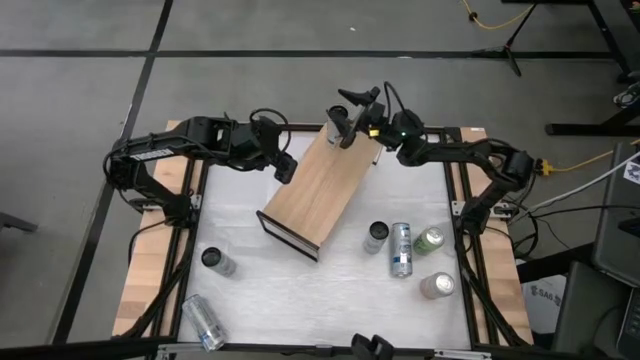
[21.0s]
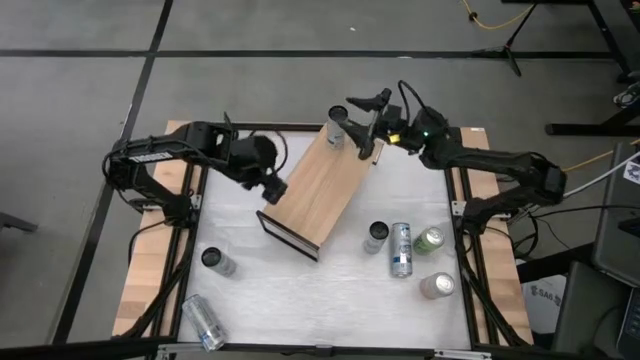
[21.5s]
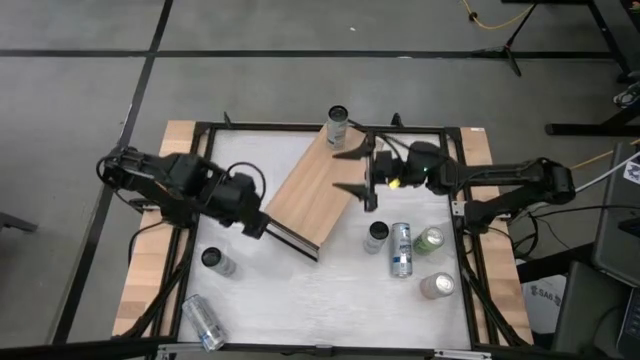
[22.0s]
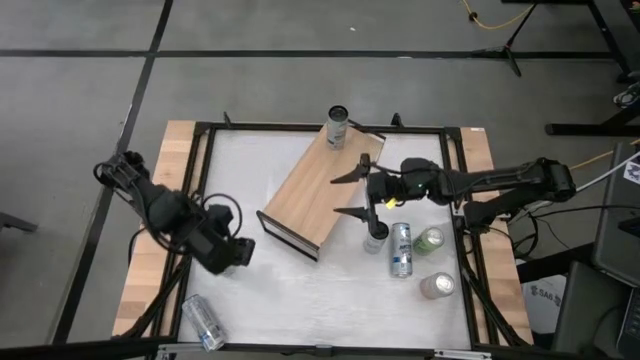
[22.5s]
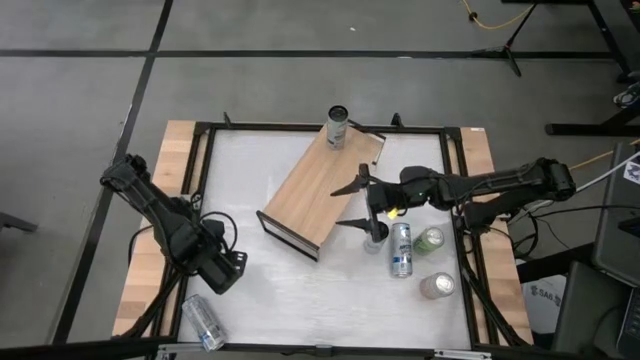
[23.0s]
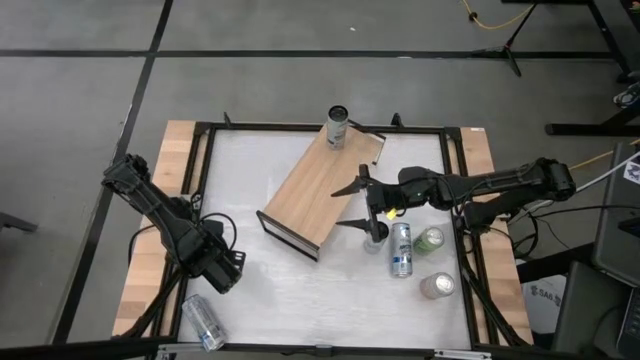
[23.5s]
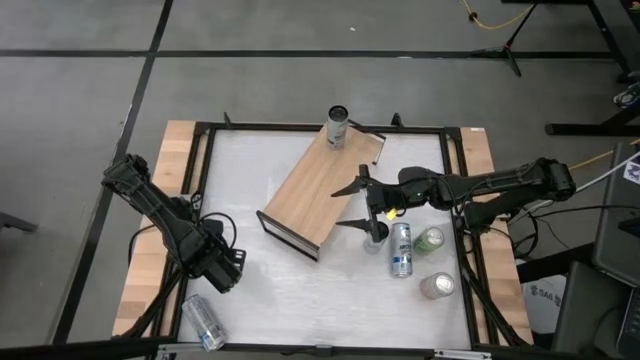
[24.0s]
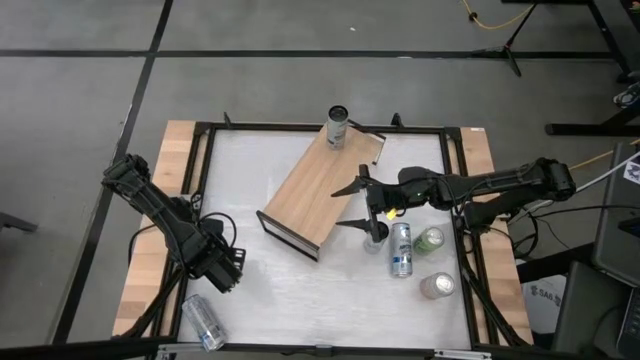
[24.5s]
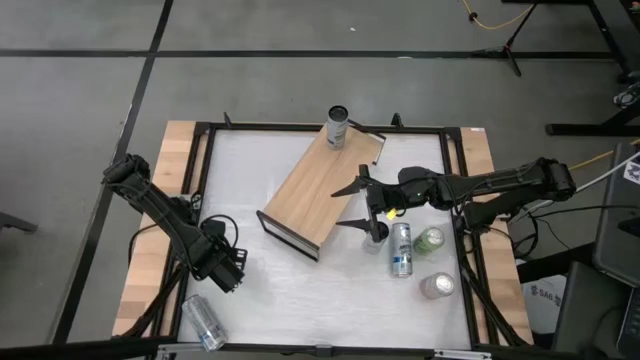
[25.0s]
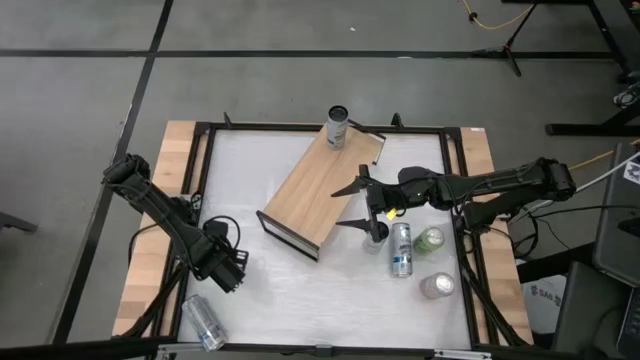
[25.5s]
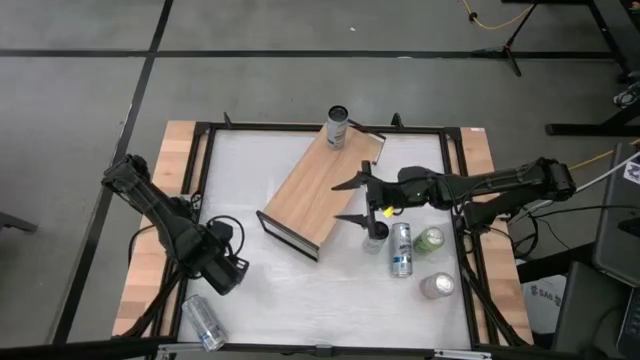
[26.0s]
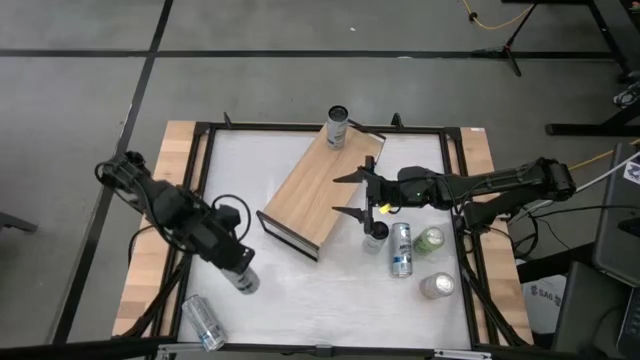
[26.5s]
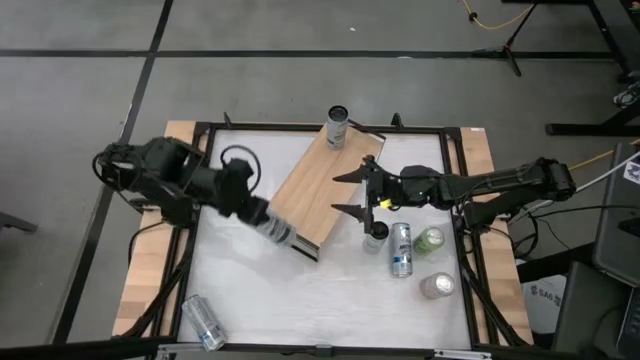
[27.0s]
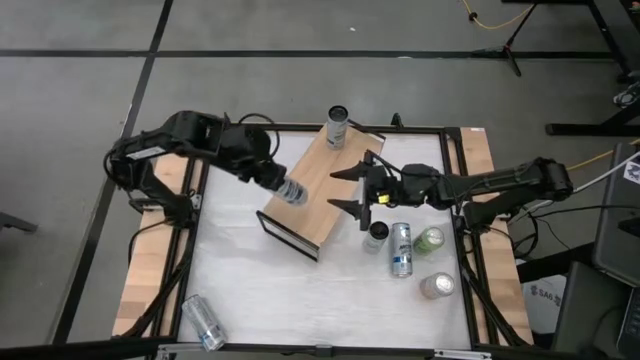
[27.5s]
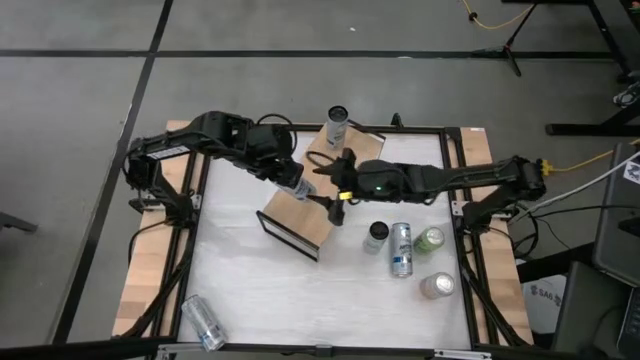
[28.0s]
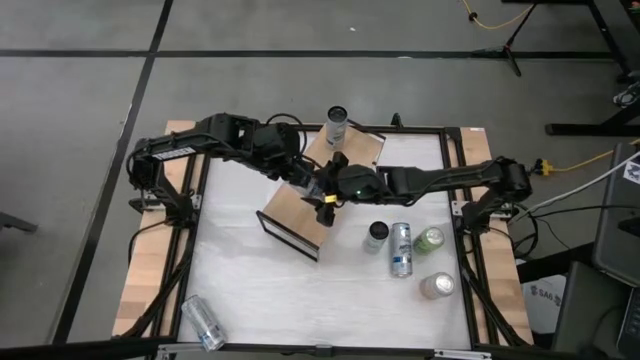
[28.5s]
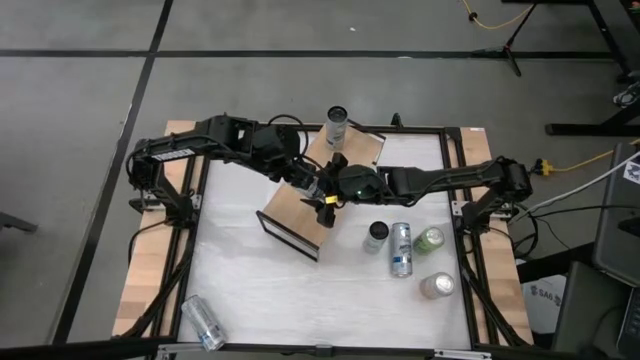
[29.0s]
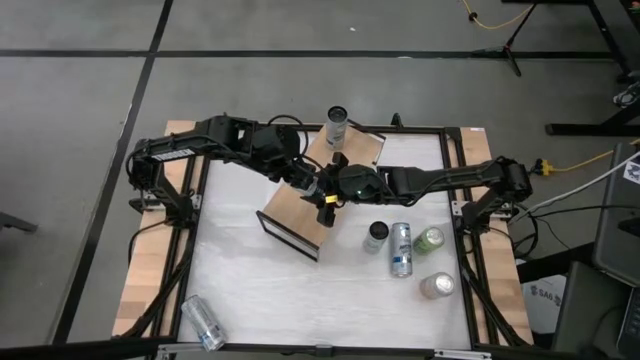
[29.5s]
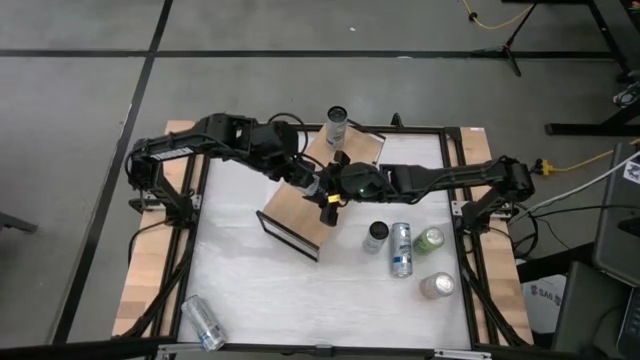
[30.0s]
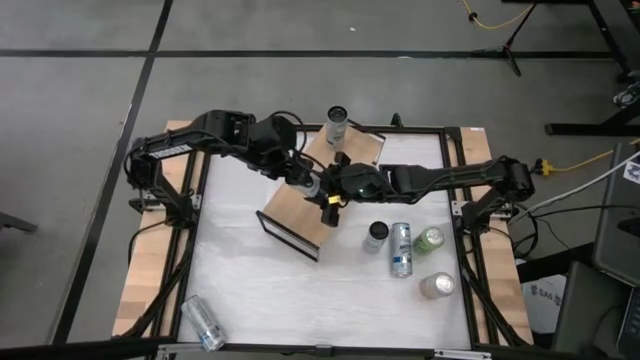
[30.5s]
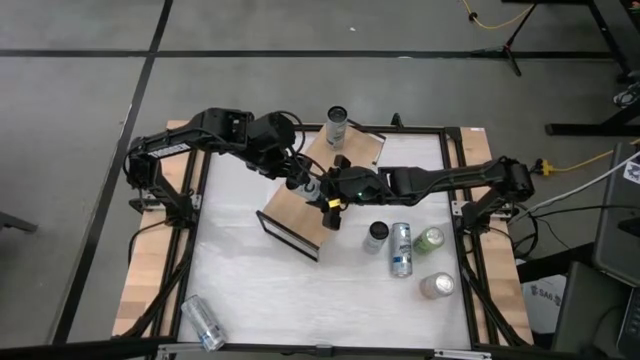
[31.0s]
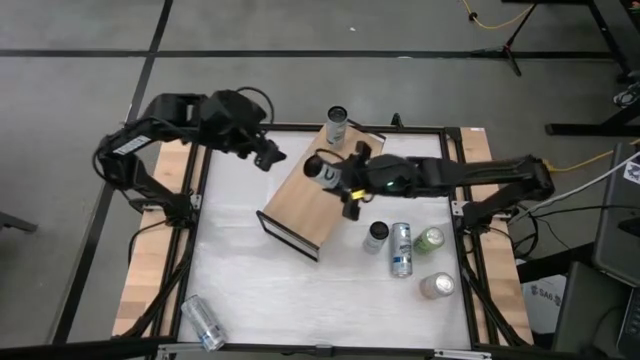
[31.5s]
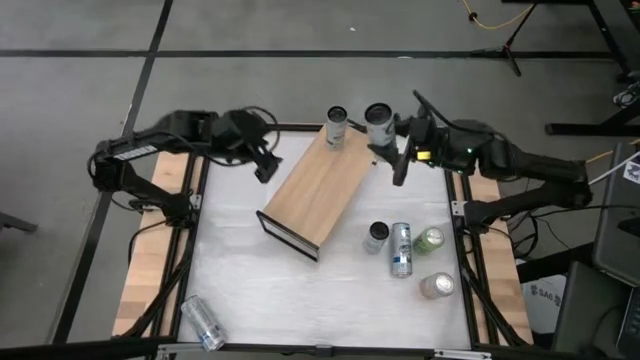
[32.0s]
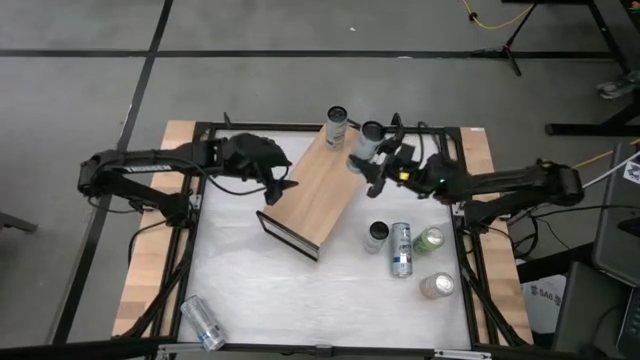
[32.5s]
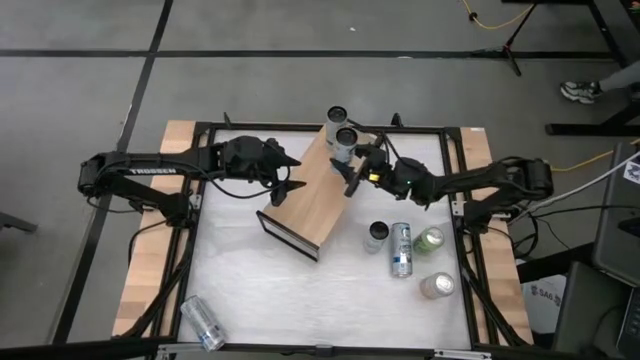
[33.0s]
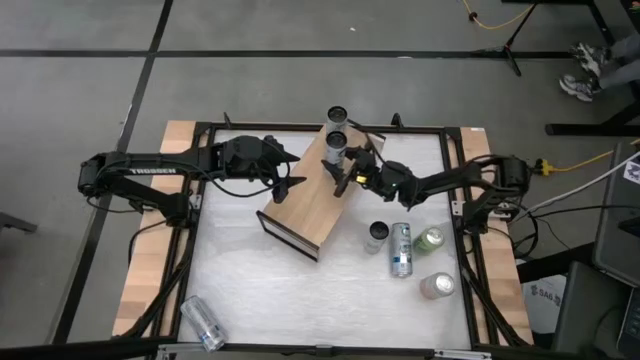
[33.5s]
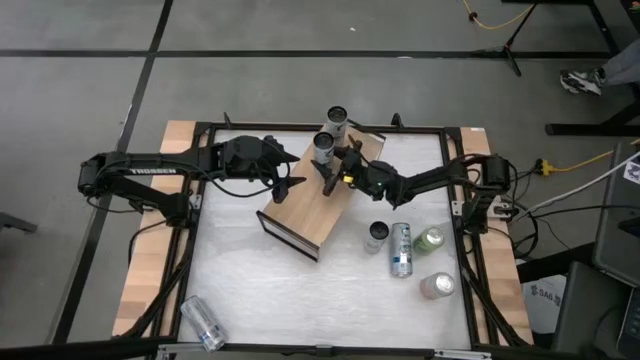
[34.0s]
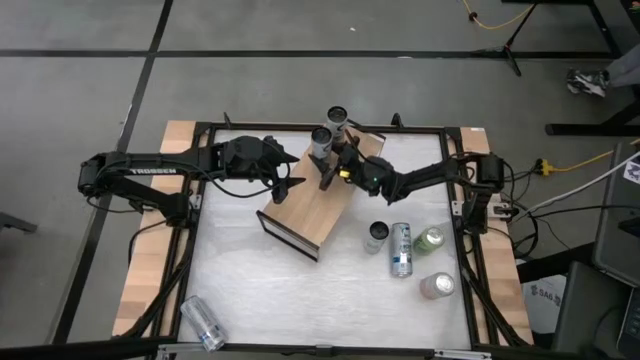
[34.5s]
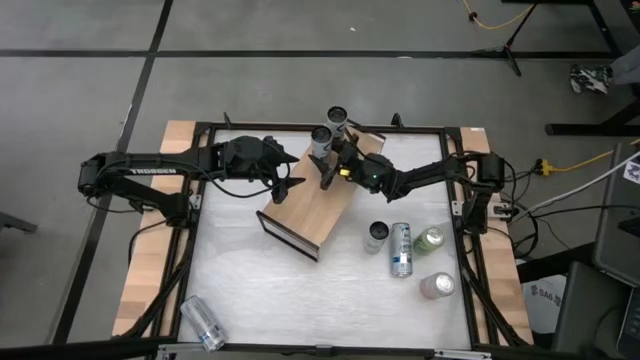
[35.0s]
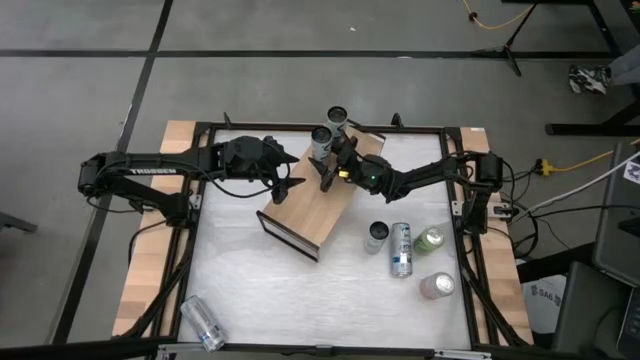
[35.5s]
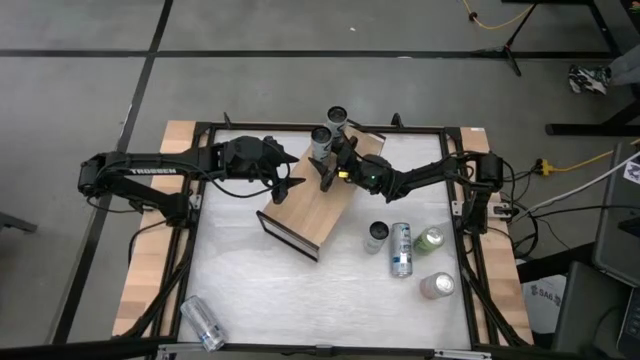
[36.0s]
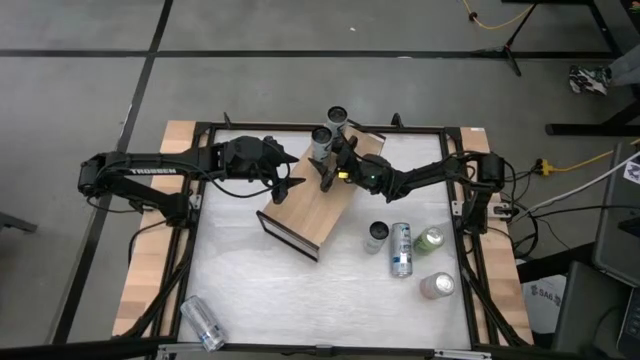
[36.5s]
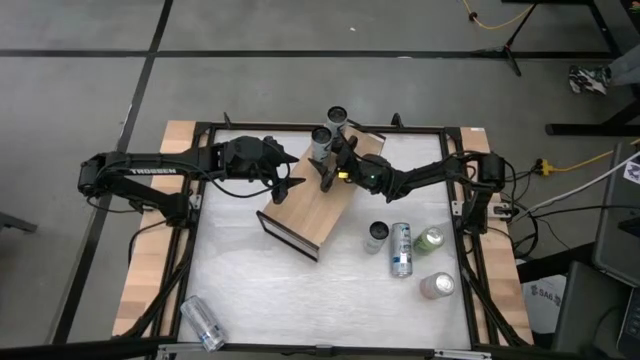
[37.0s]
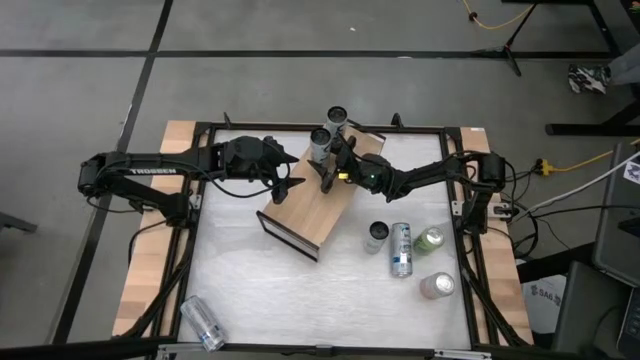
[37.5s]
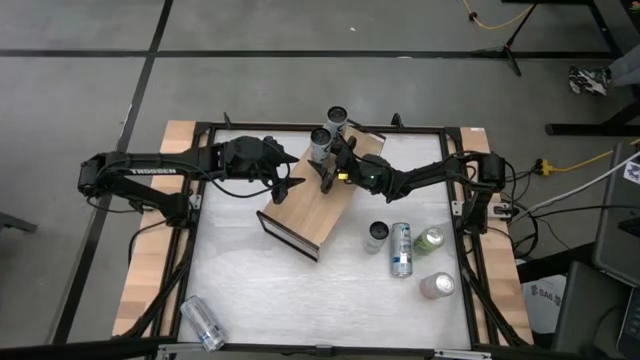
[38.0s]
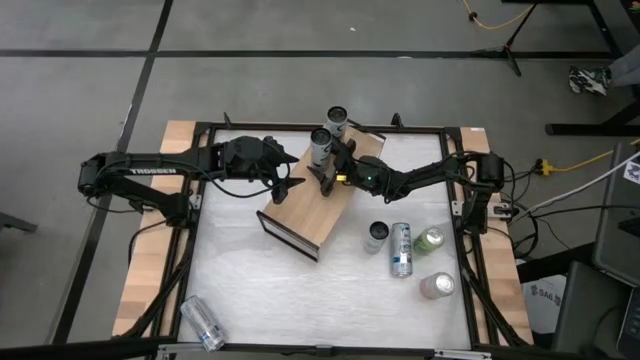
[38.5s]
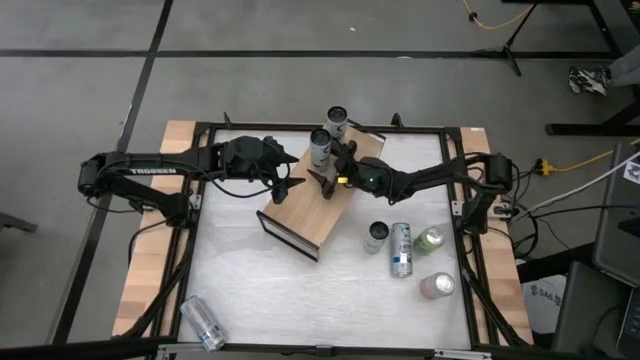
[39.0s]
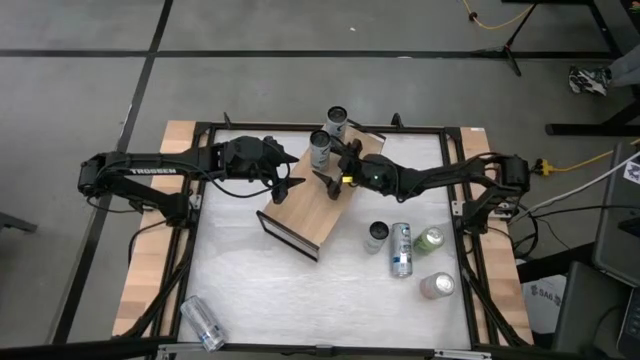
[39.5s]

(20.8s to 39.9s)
Task: Place canned beverage on shelf
Put the white soda can on the shelf
